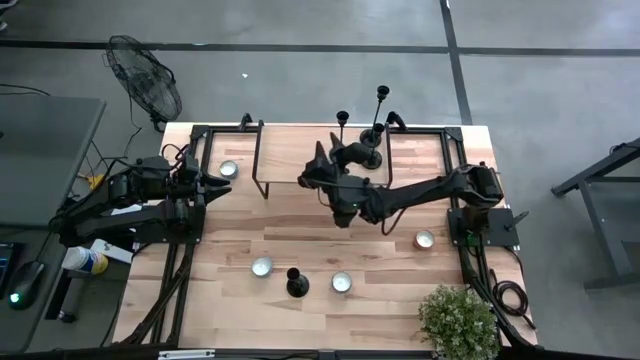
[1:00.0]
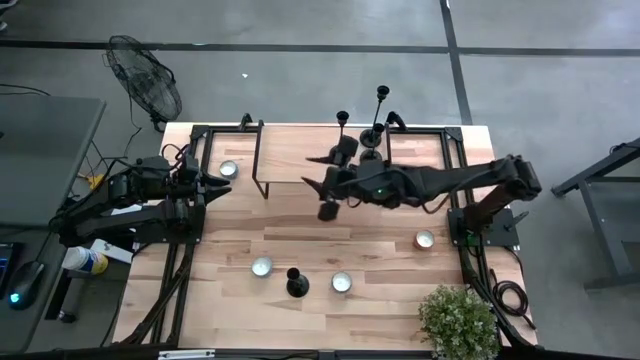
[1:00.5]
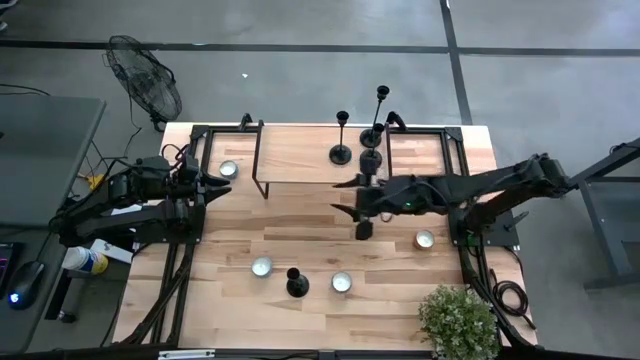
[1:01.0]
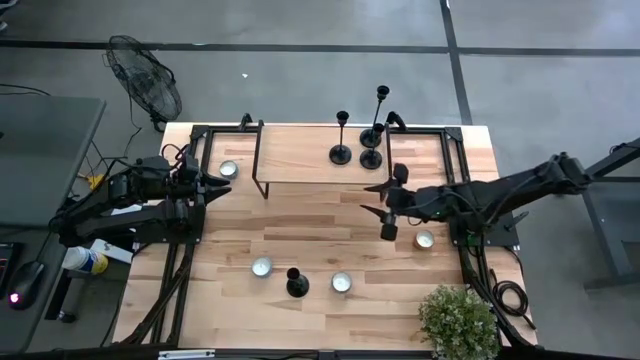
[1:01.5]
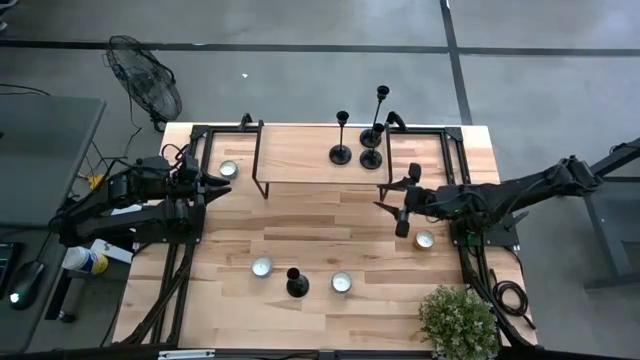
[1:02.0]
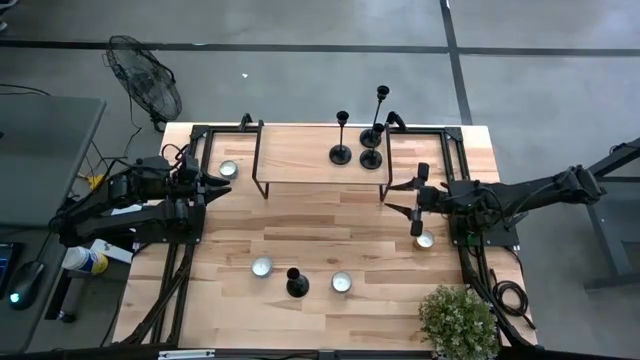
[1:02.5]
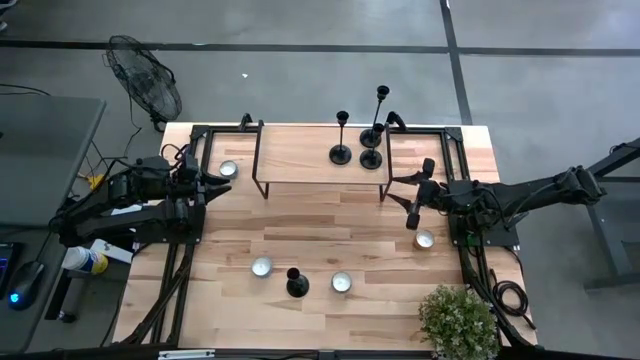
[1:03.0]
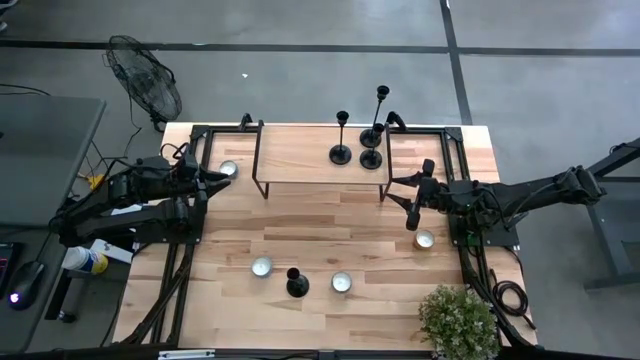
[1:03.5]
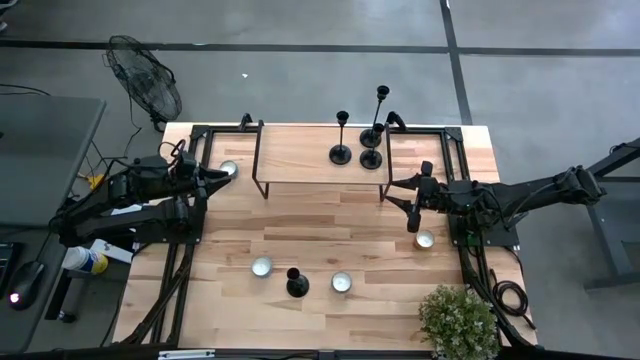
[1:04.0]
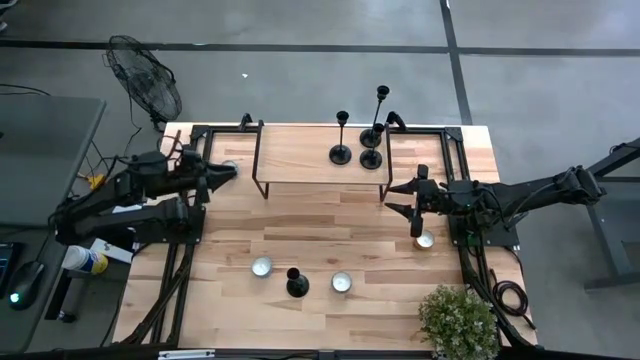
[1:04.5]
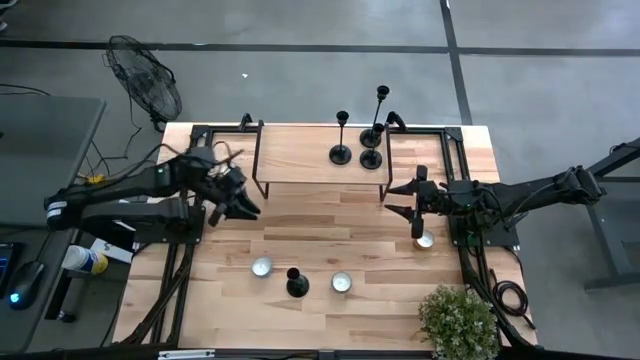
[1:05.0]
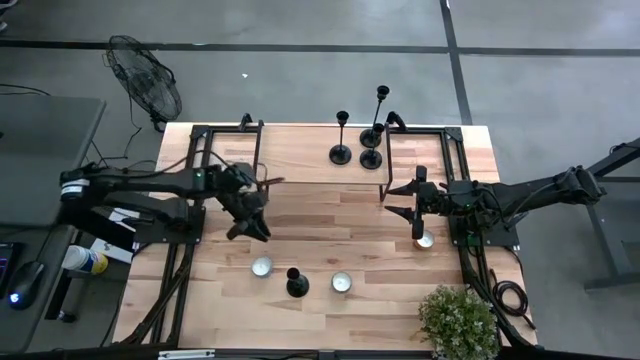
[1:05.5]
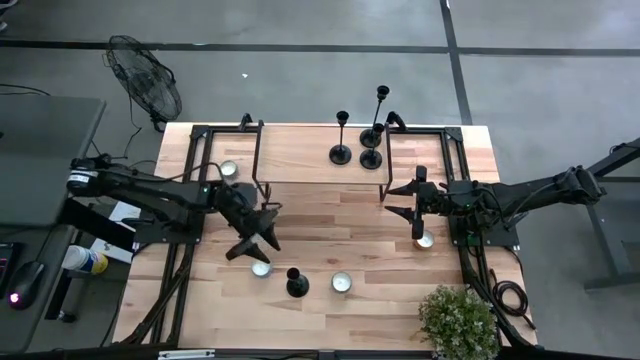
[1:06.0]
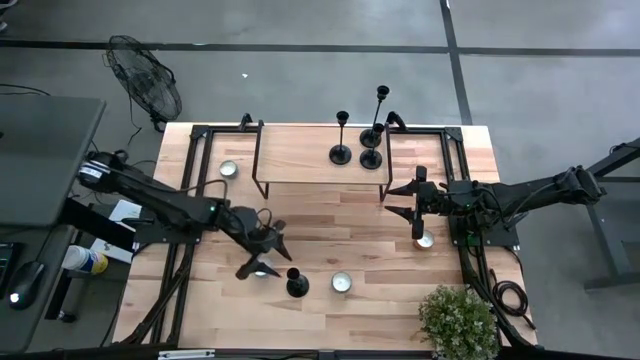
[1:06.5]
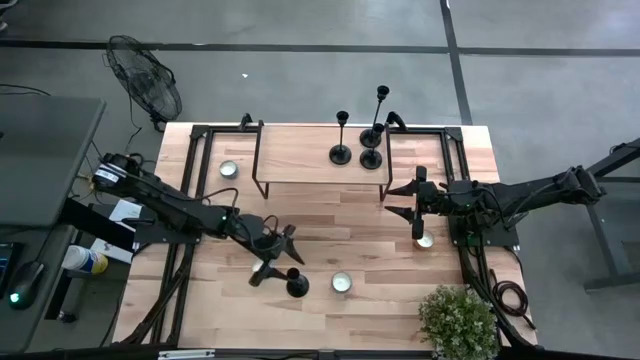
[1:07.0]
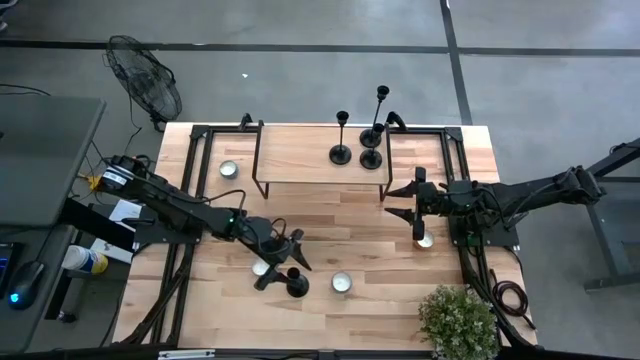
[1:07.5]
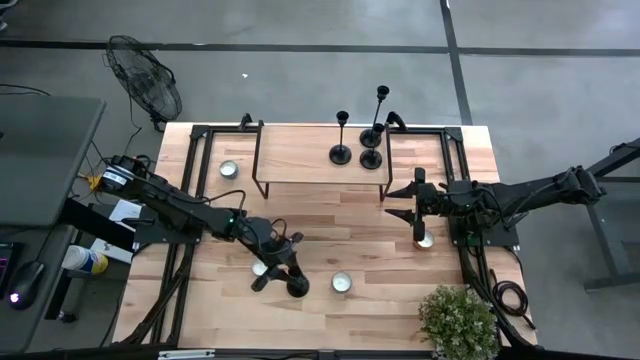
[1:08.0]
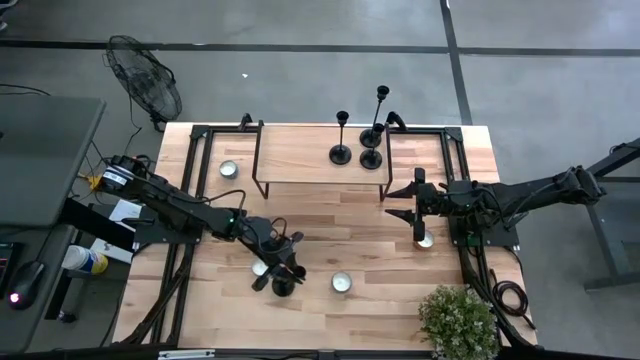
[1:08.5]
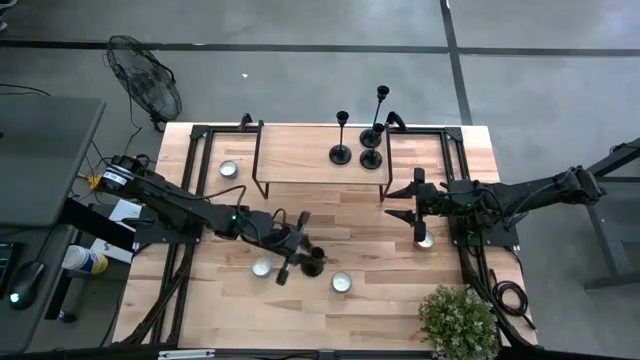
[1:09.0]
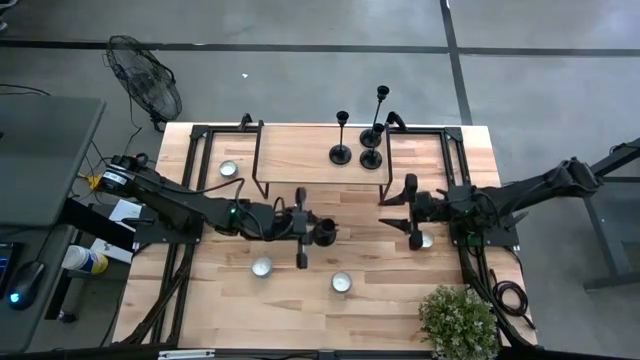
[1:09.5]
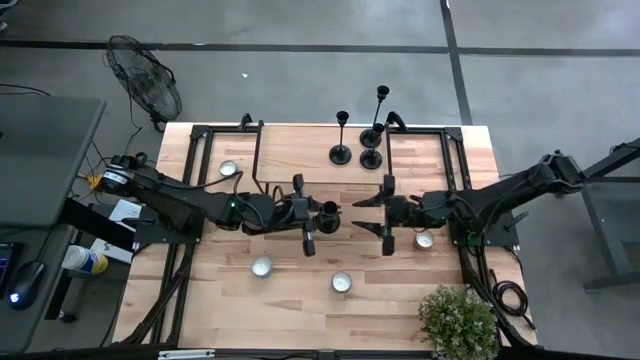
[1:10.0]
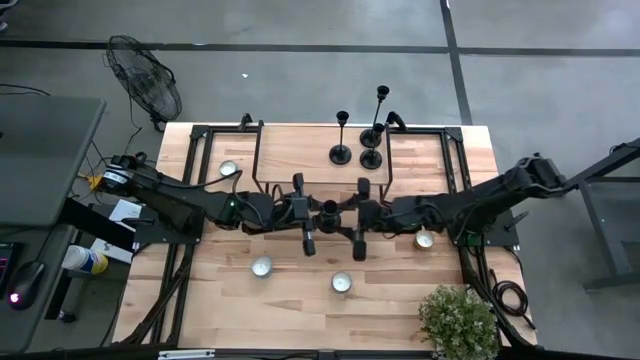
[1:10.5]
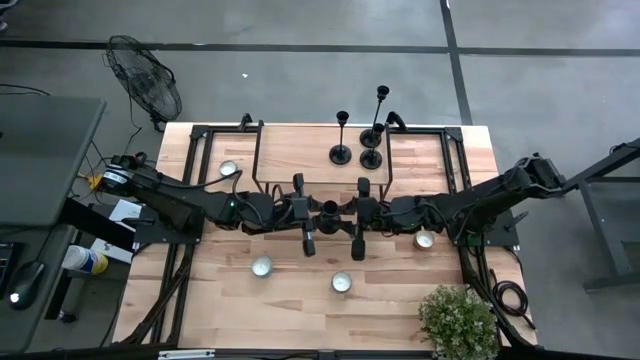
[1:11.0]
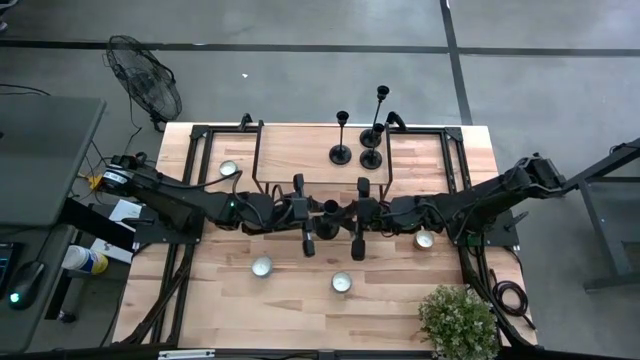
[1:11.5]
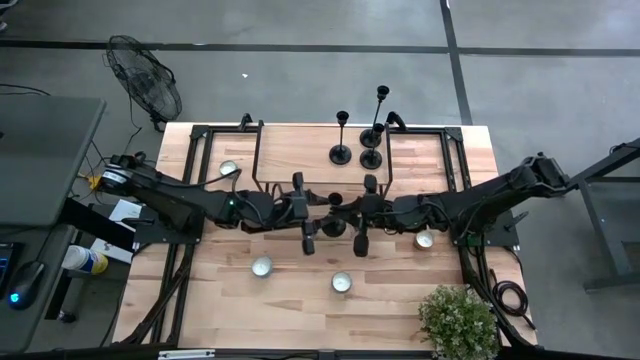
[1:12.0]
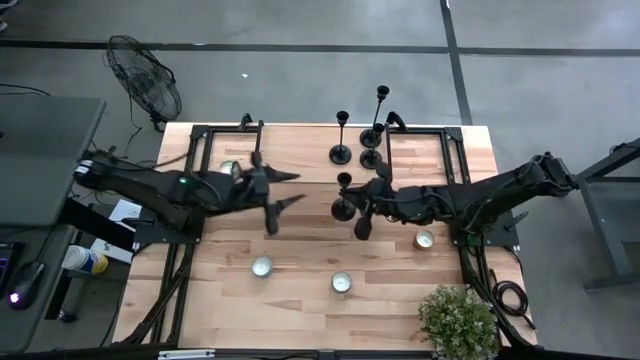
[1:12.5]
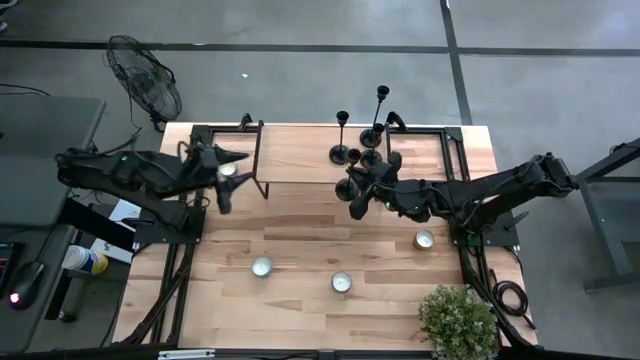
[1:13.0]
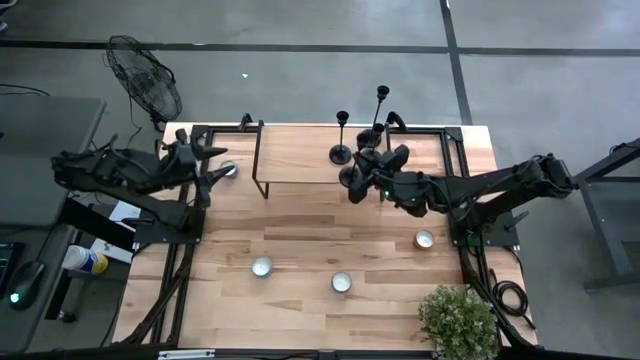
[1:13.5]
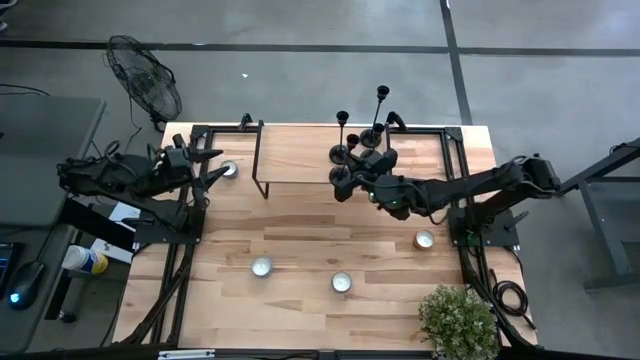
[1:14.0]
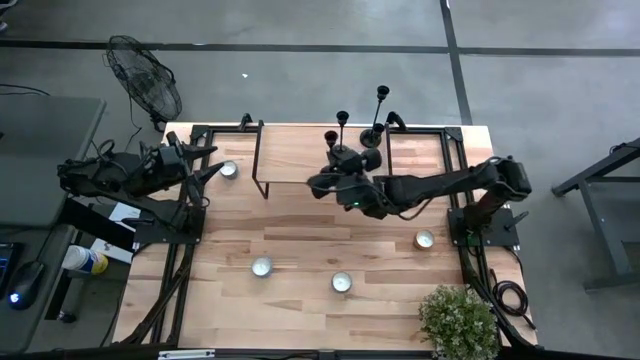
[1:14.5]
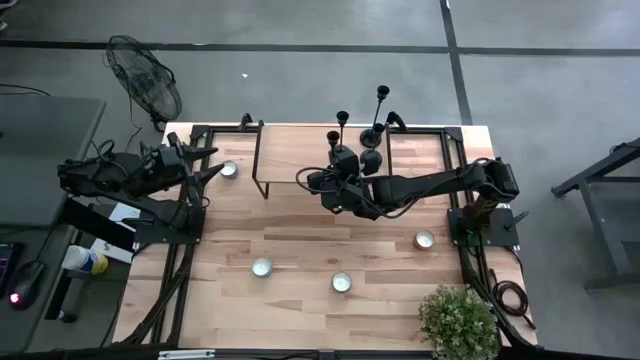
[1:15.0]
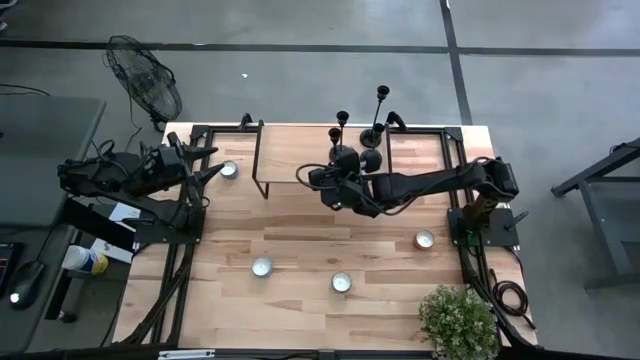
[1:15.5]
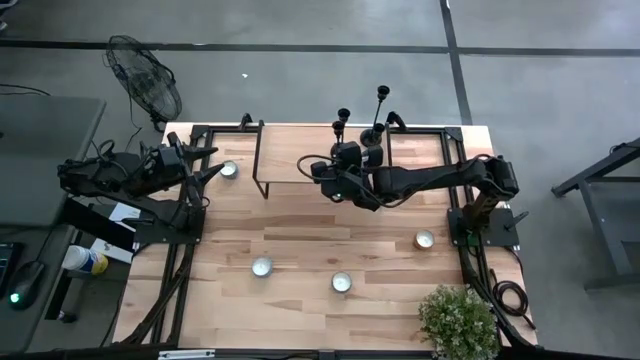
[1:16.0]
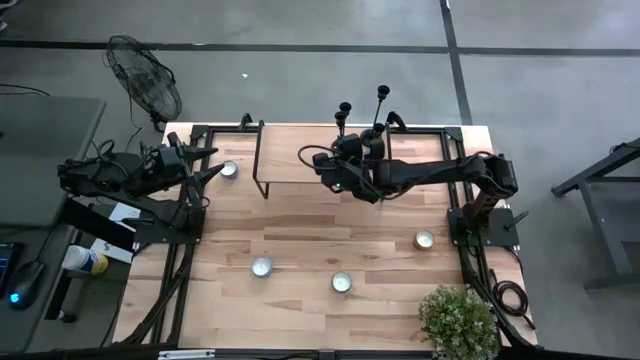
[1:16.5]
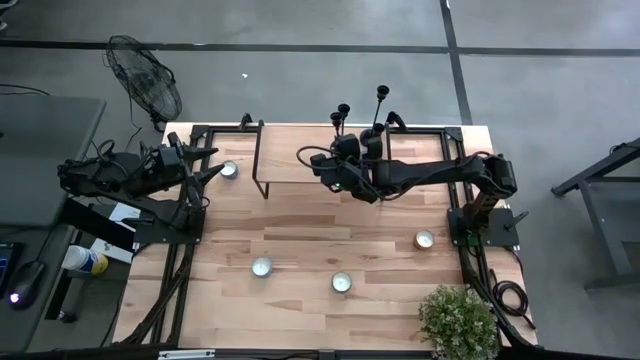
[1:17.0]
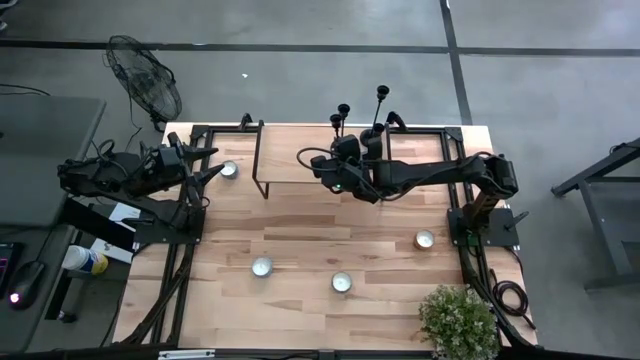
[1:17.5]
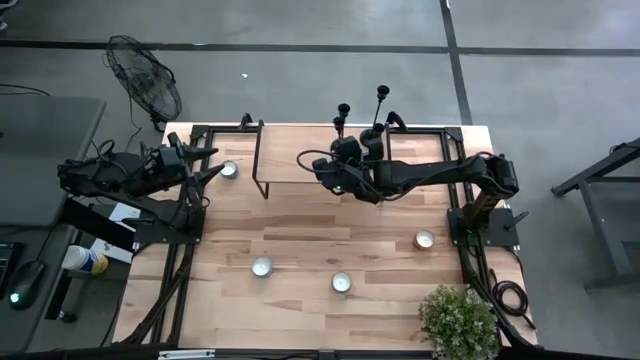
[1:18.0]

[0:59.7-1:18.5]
Task: Pick & Place candle stick holders
Put the black candle holder on the shelf and align it with the left black candle holder

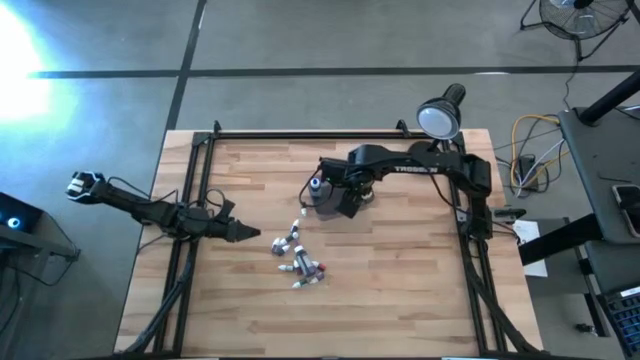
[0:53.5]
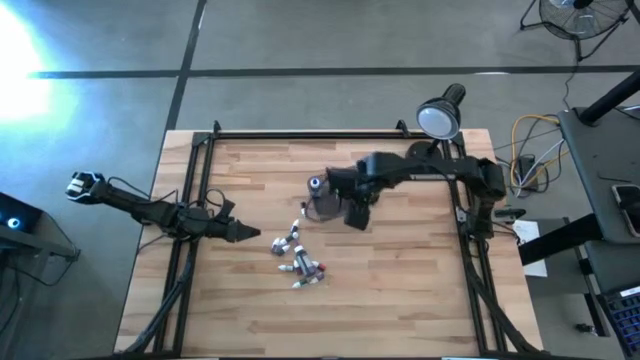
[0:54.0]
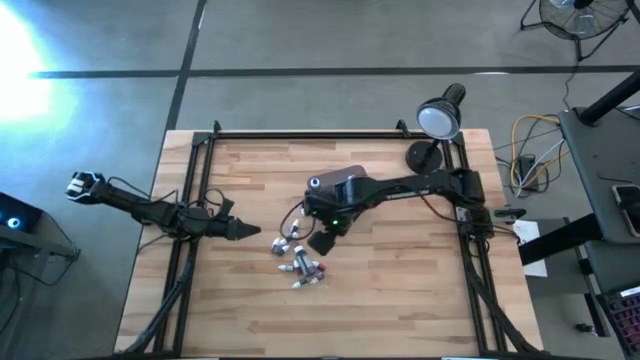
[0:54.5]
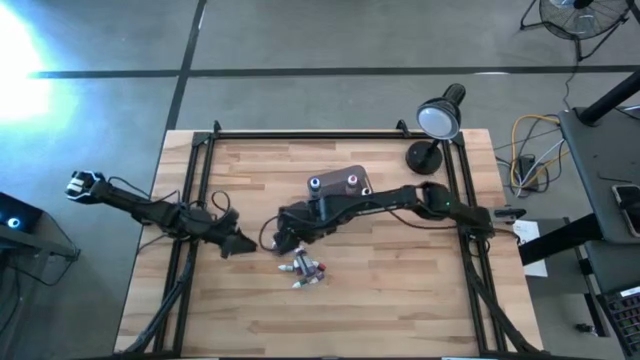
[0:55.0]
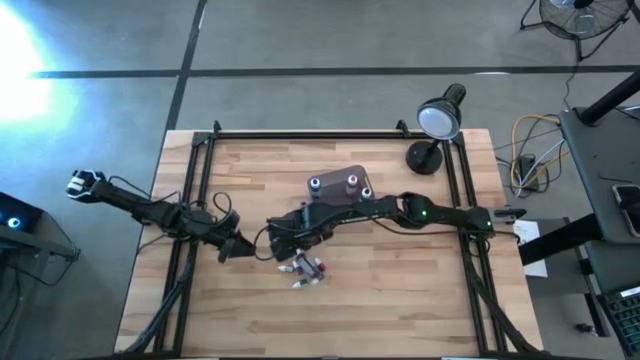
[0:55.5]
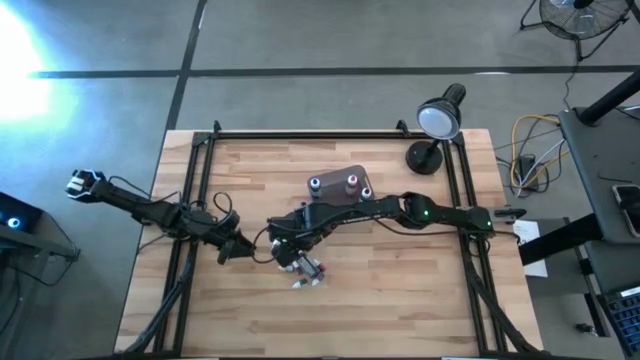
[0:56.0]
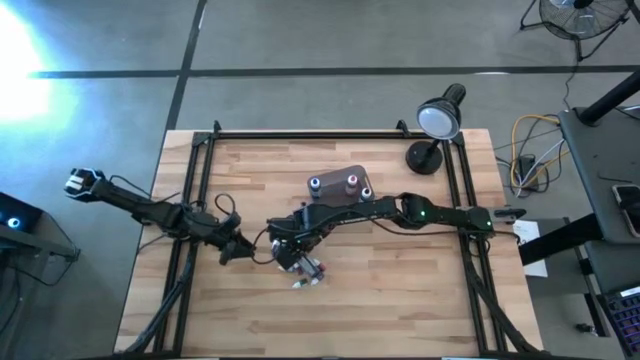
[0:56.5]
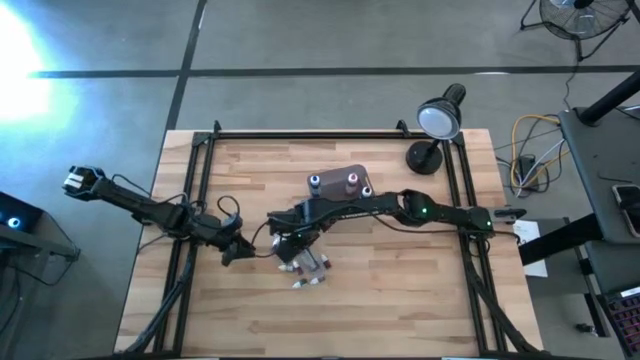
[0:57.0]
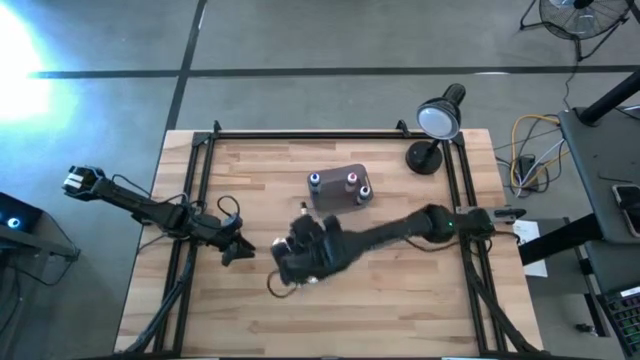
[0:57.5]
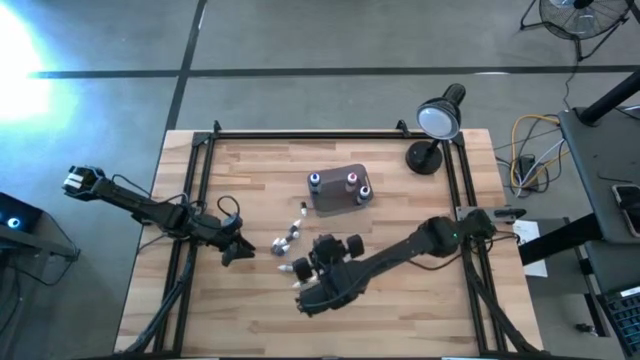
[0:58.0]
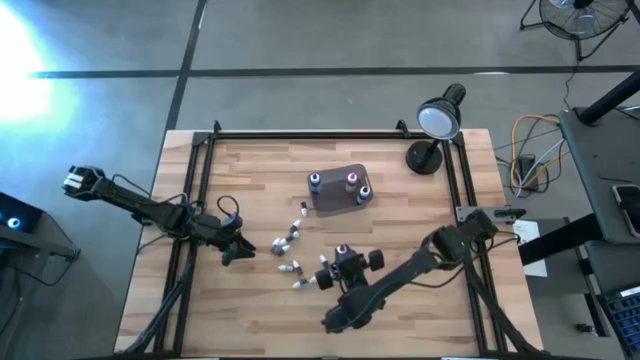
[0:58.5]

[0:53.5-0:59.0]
Task: Pick & Place food coloring
Put the big purple food coloring bottle into the black transparent bin
